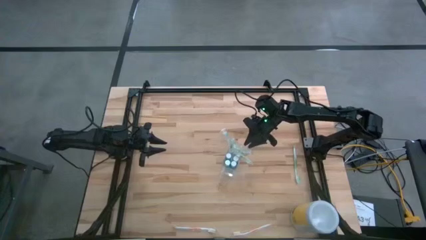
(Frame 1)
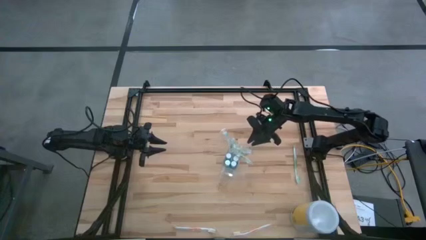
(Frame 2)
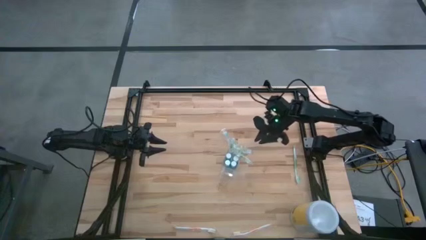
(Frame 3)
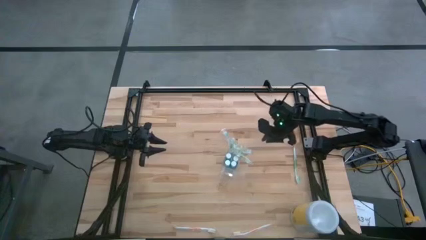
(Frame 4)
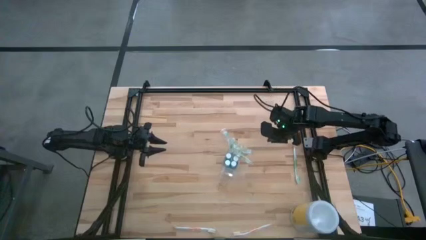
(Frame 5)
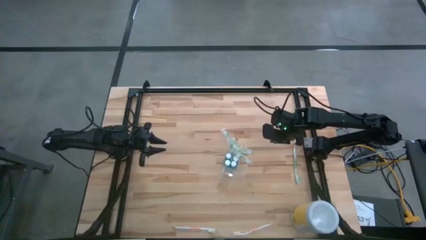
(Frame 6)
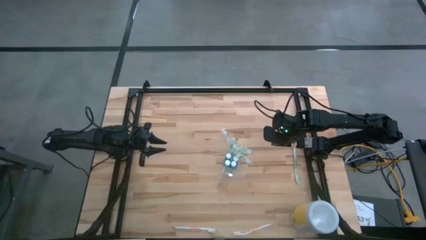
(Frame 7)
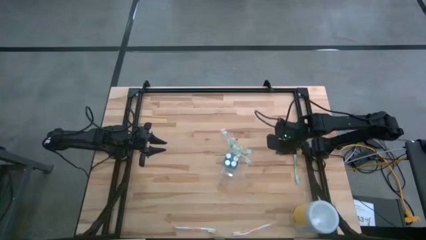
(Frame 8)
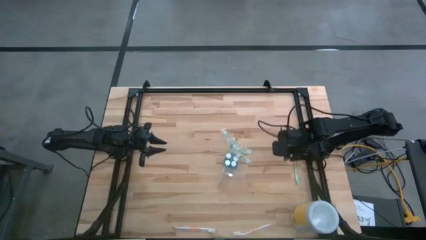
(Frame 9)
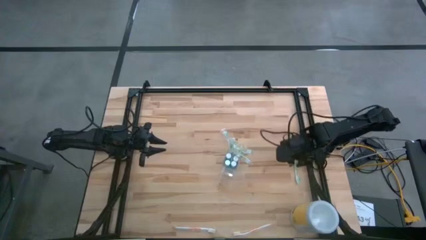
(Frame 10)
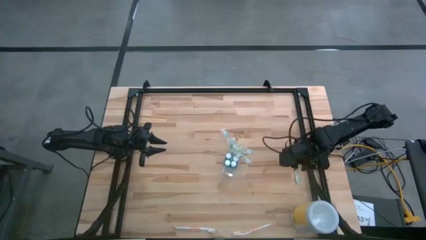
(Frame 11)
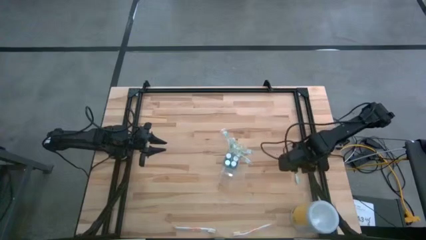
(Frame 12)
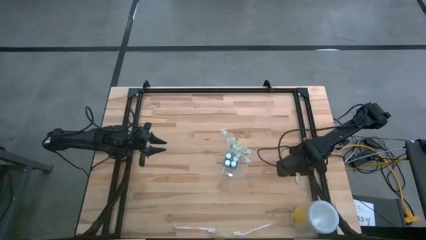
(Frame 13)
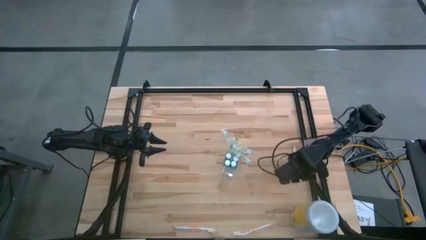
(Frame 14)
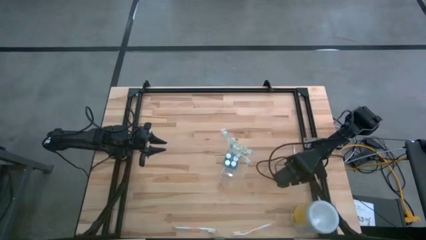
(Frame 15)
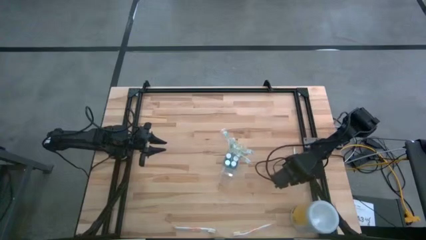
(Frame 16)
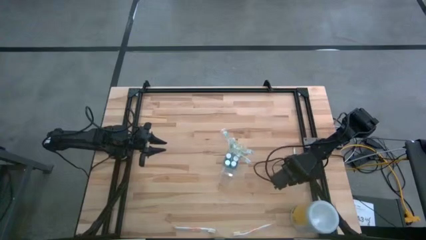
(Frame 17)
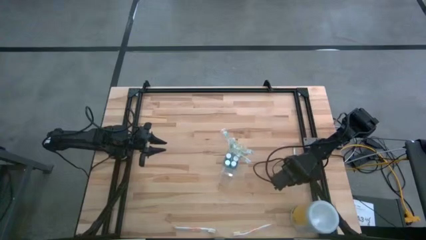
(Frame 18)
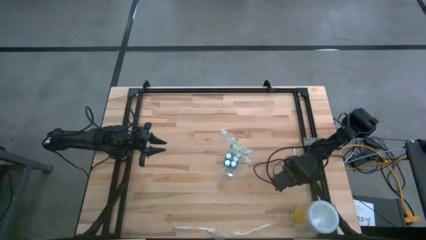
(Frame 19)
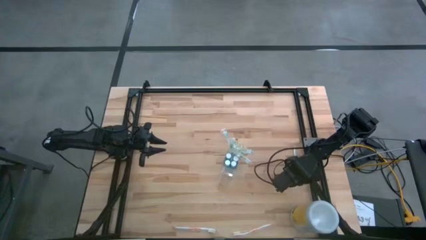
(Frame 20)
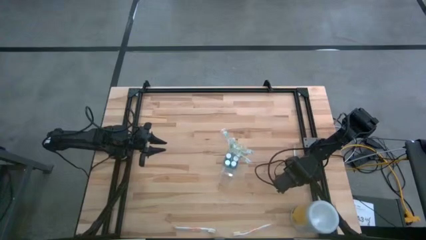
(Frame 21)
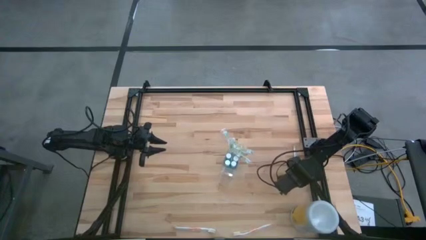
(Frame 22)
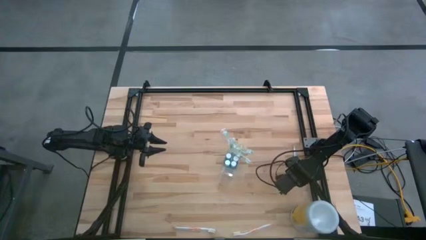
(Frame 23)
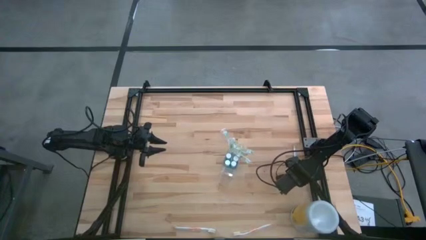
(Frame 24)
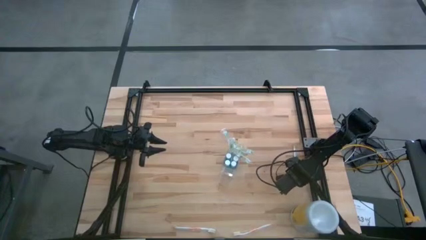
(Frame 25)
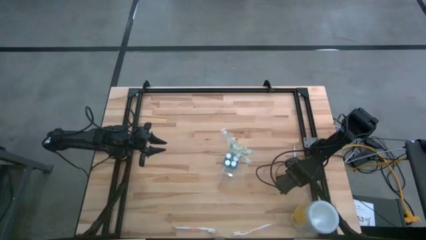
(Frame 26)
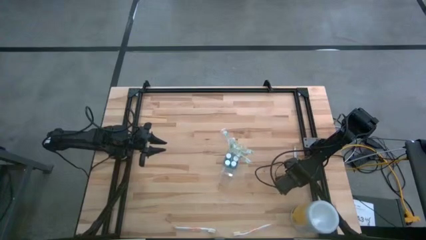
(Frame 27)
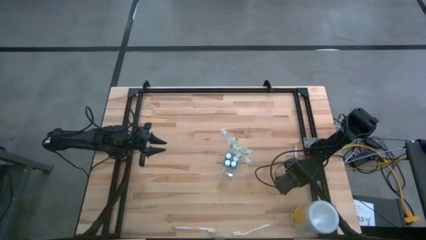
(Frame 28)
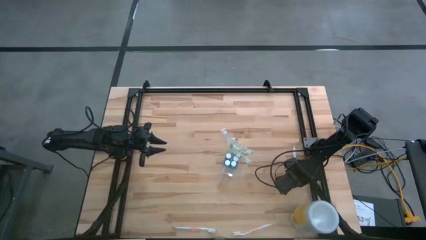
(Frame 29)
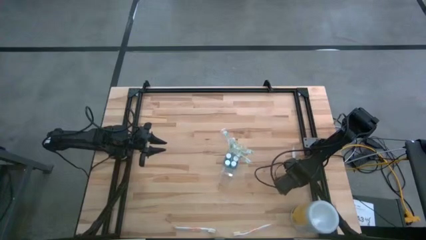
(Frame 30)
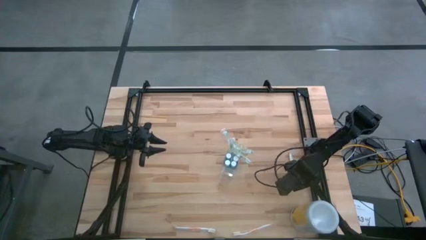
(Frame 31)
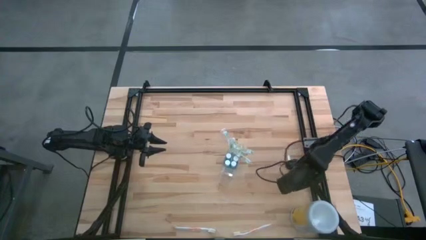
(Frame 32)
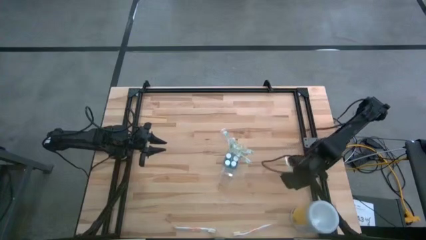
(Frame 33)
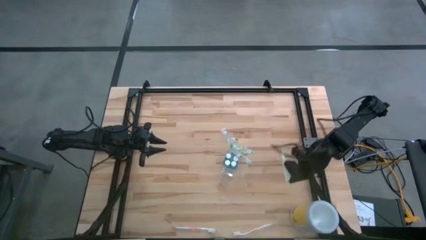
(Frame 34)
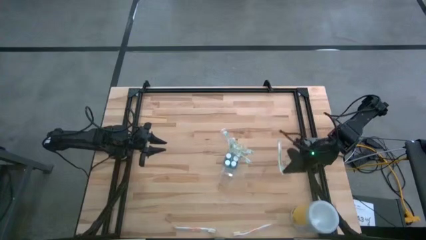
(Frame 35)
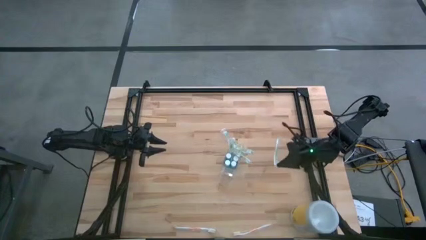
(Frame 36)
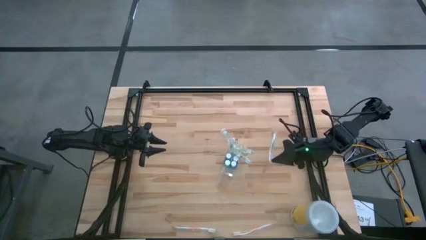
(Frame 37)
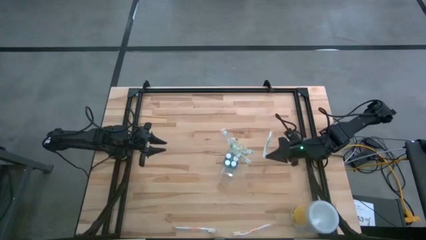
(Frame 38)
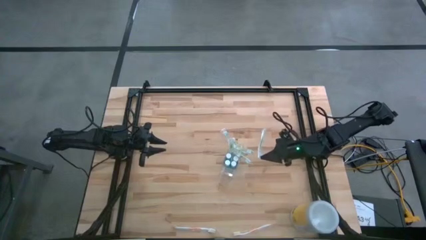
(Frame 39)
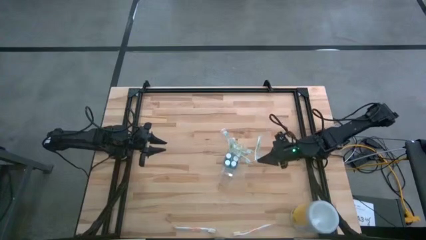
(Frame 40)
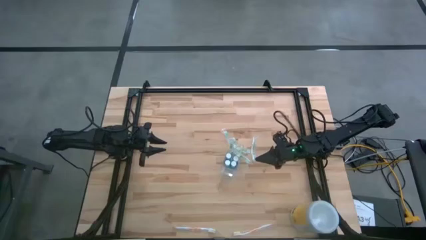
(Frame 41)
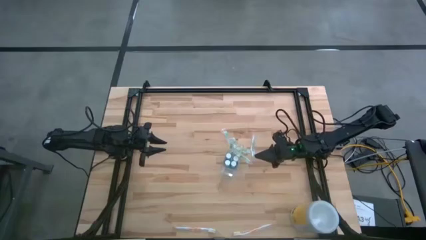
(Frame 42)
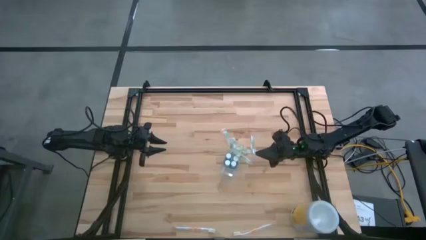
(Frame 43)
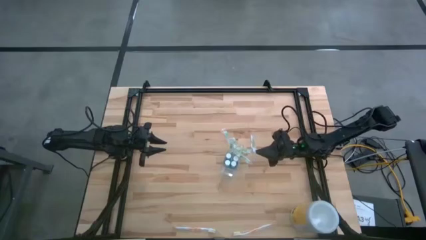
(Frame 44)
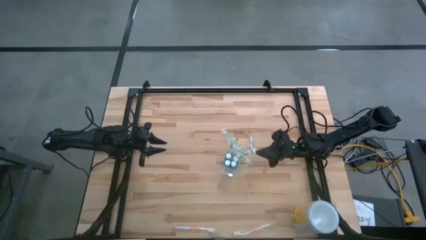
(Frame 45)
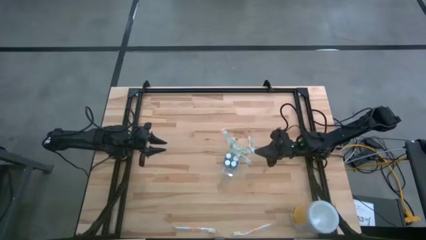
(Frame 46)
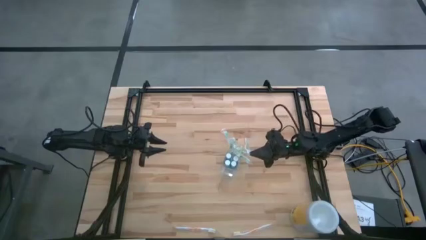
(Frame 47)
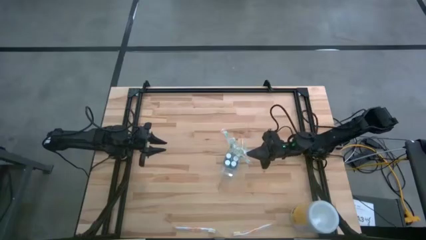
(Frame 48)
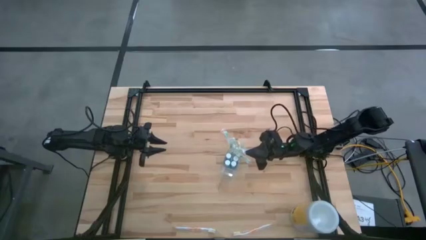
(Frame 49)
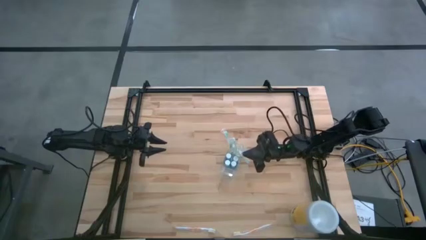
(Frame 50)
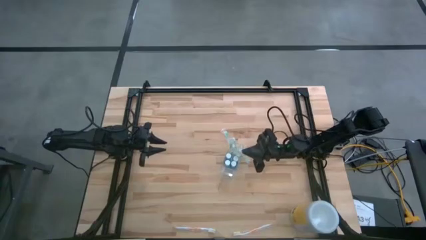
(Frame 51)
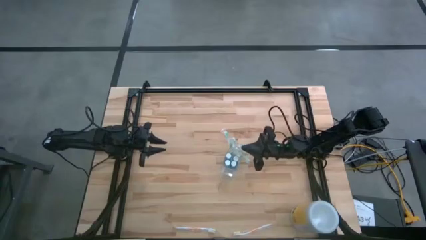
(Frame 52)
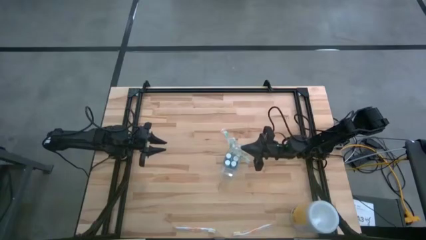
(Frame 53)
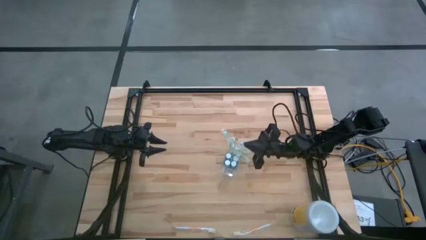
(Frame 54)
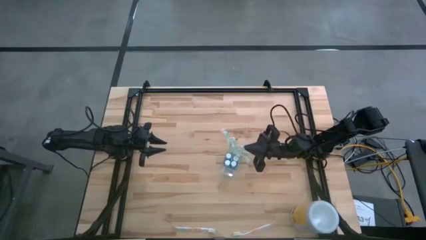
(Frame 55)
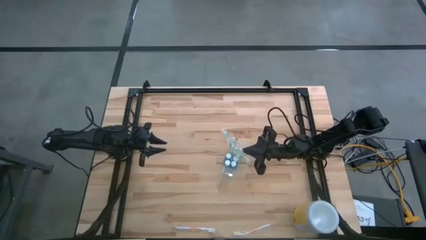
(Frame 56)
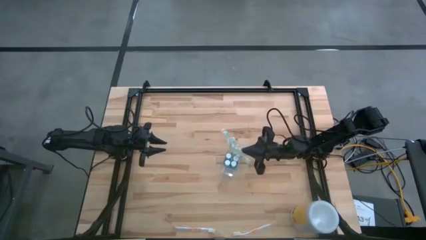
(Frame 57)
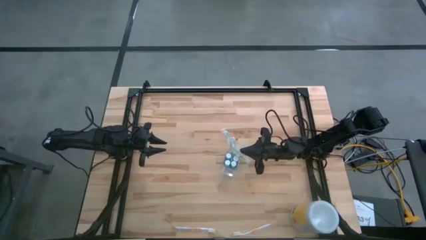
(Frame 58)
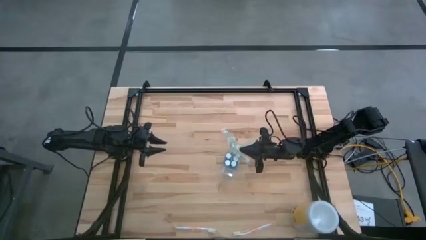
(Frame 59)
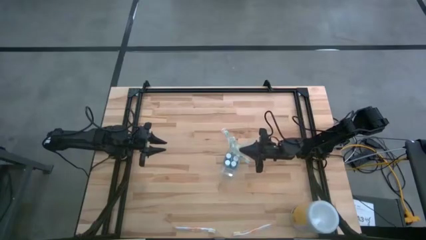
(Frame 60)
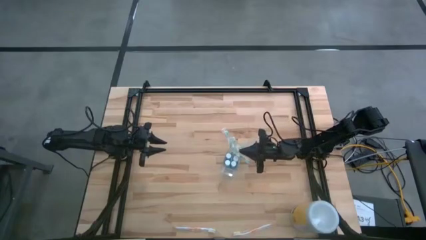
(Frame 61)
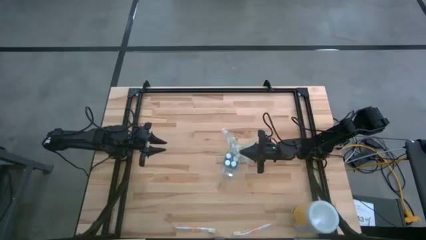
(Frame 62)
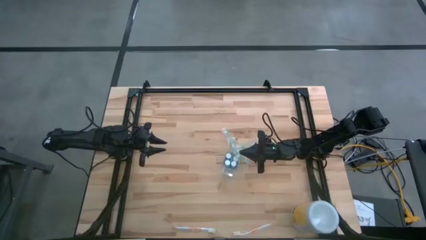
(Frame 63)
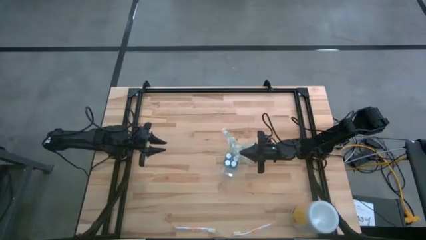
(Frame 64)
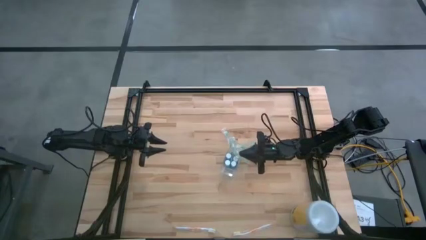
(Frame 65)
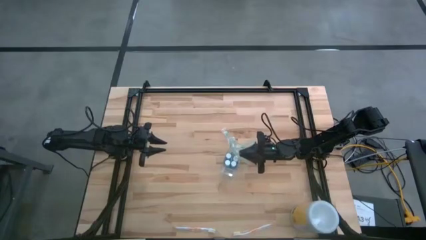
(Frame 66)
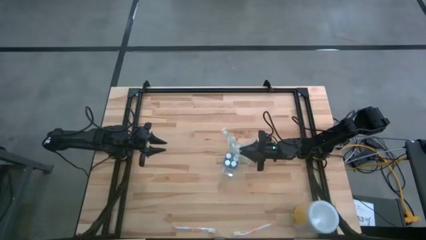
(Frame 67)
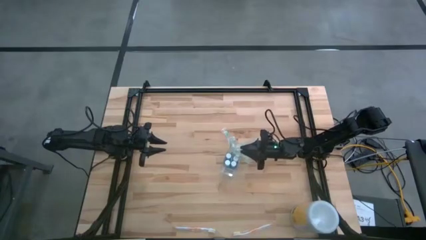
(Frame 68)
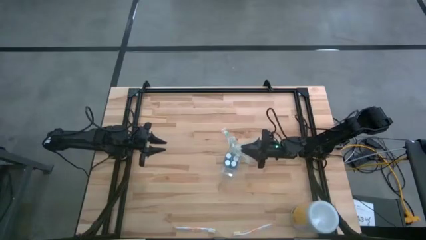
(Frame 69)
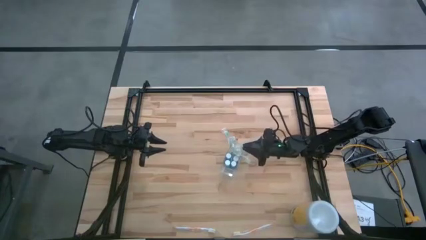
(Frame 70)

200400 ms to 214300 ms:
Task: Pick & Place toothbrushing station
Put the white green toothbrush into the back side of the transparent organizer

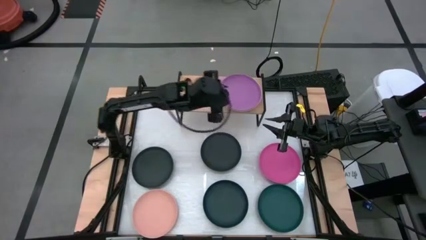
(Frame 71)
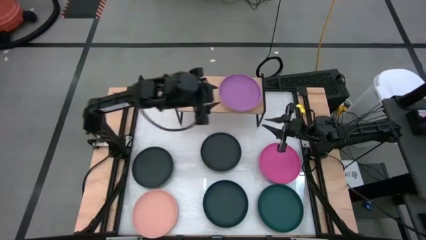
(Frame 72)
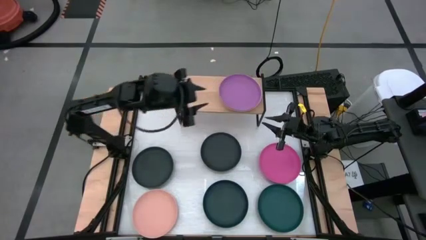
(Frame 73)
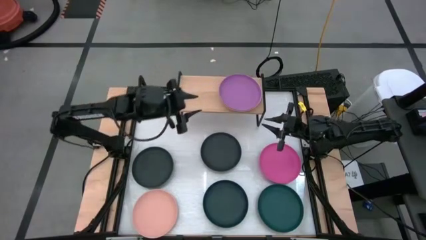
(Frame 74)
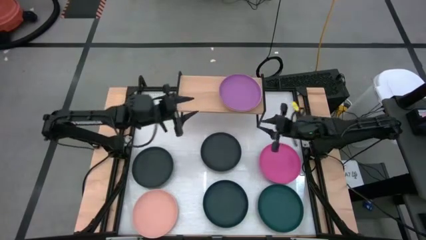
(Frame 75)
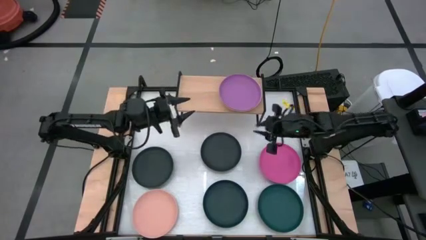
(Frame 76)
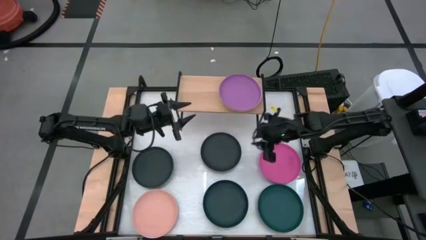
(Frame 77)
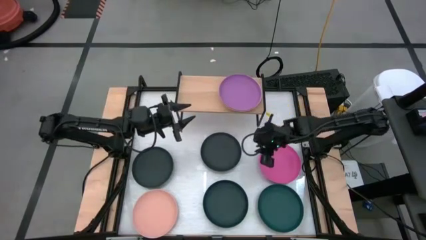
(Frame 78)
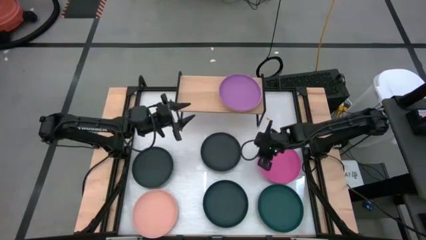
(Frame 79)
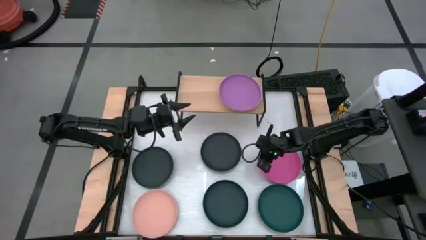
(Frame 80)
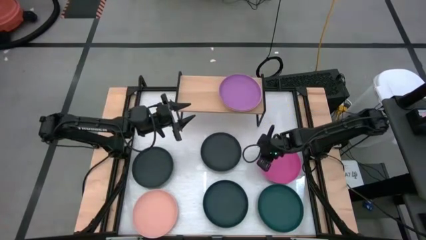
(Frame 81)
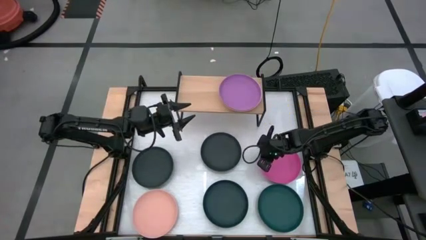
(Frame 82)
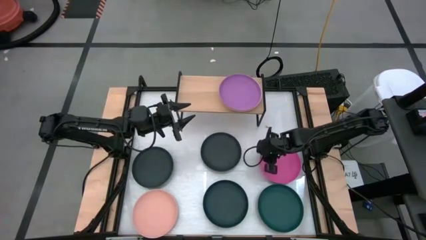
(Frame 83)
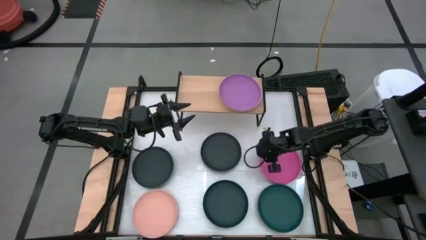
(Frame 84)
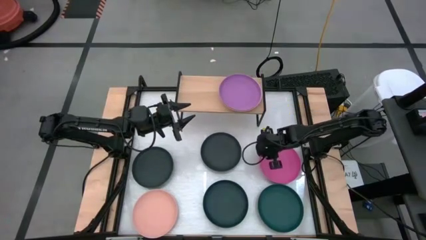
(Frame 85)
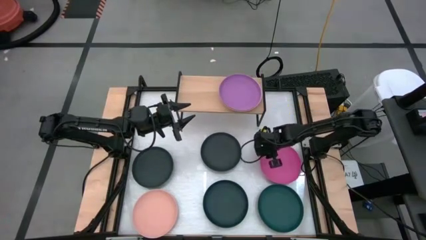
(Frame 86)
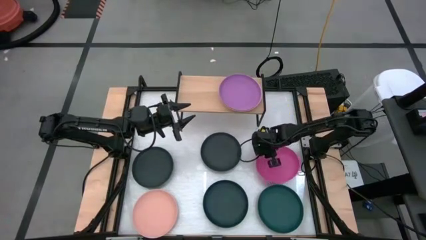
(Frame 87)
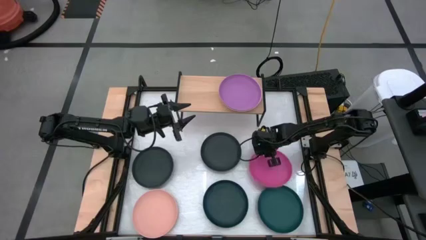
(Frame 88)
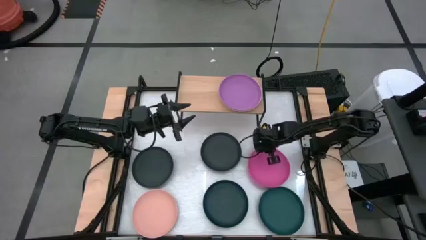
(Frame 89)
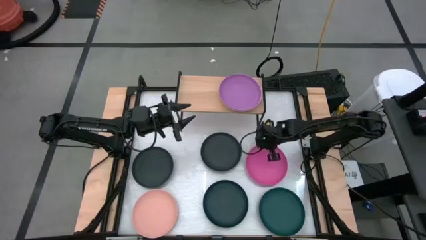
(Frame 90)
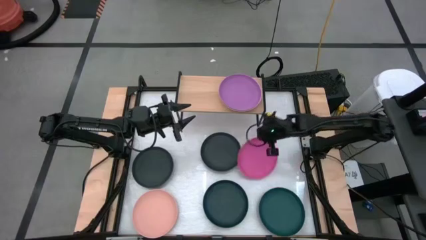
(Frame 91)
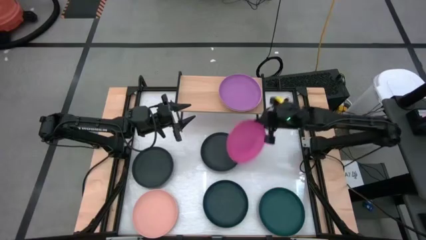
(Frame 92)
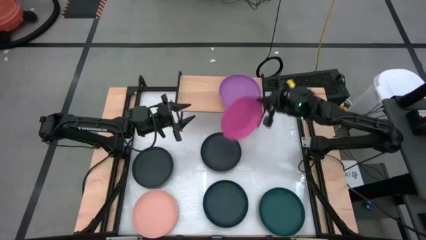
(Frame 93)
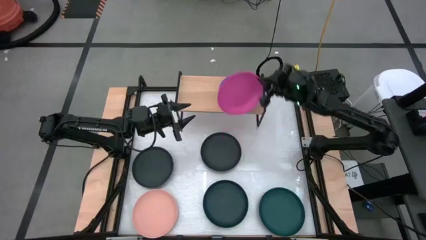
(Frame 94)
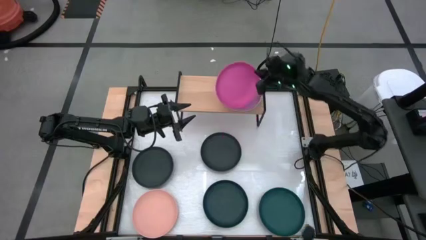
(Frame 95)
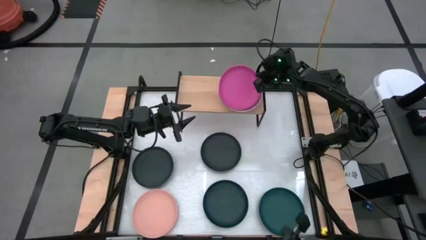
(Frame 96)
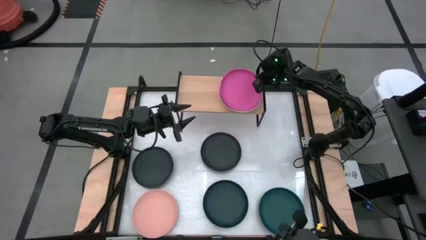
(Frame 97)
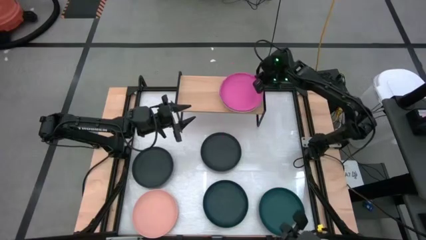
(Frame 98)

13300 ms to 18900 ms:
Task: Place and stack plates onto a shelf
Stack the pink plate on top of the purple plate on the shelf
